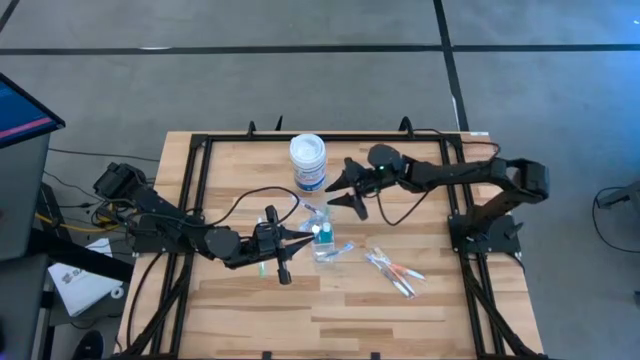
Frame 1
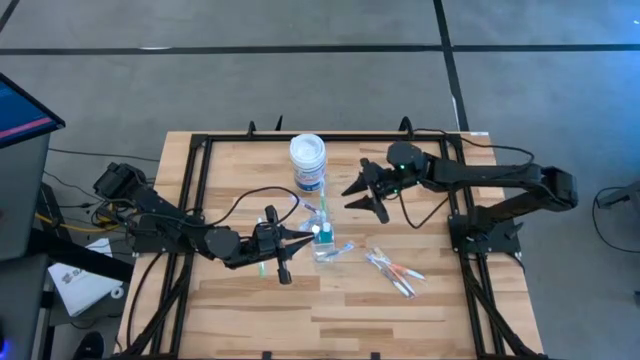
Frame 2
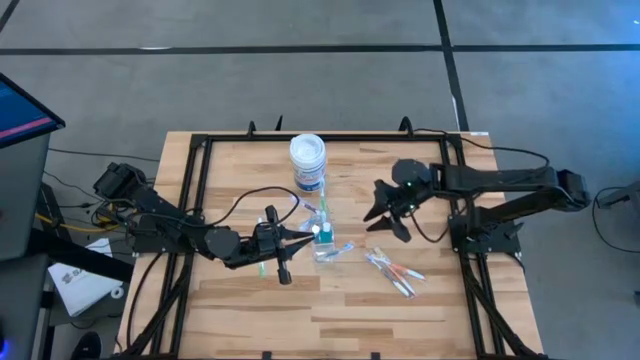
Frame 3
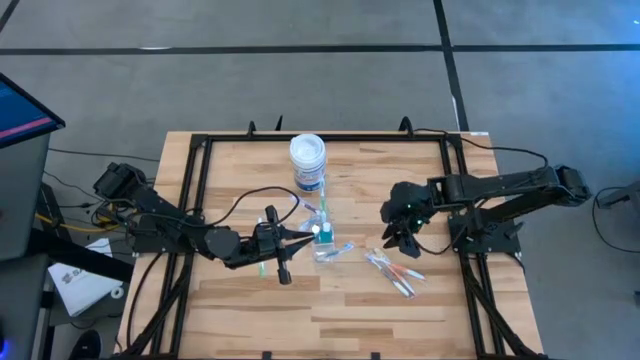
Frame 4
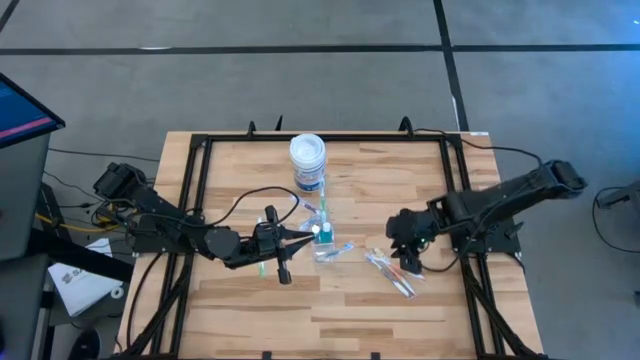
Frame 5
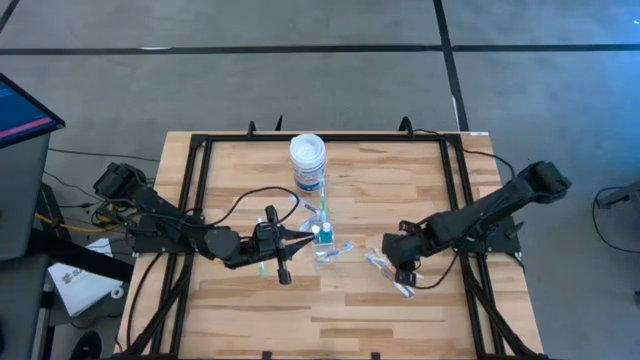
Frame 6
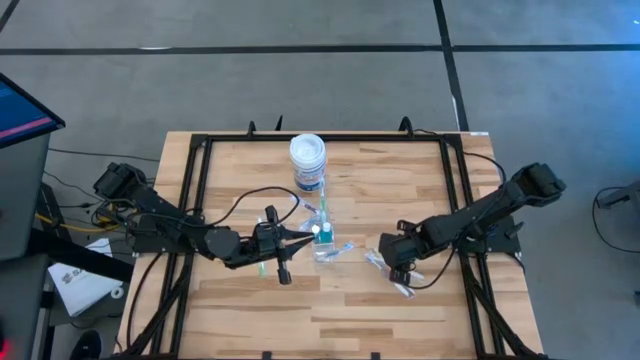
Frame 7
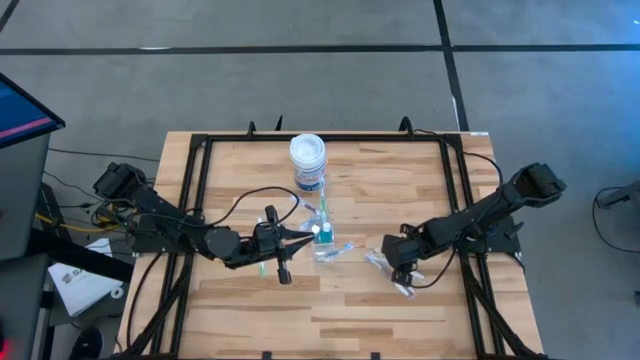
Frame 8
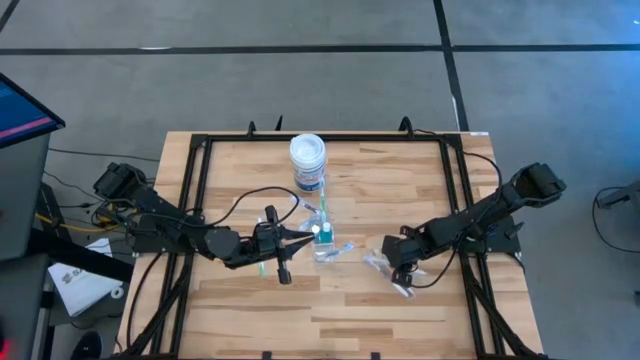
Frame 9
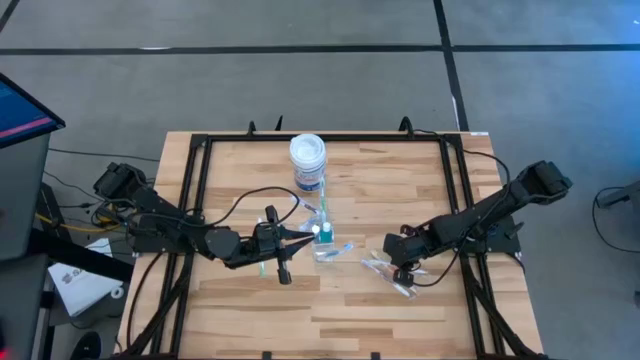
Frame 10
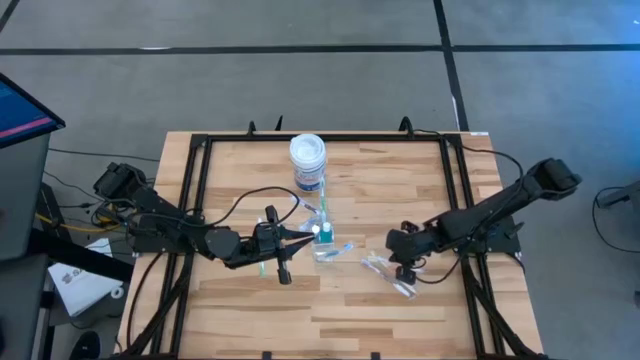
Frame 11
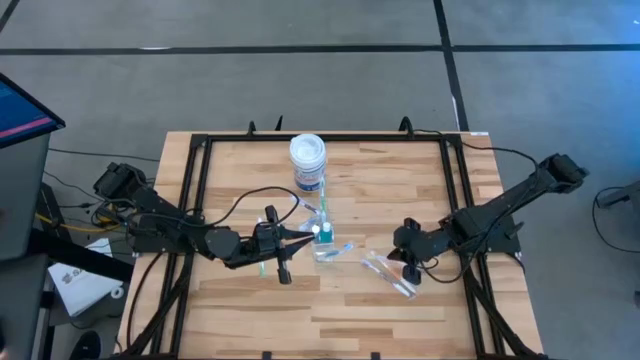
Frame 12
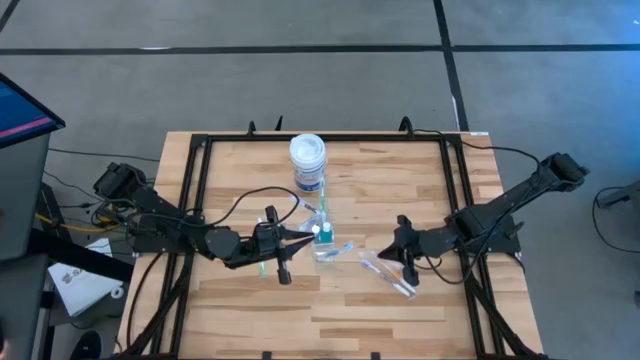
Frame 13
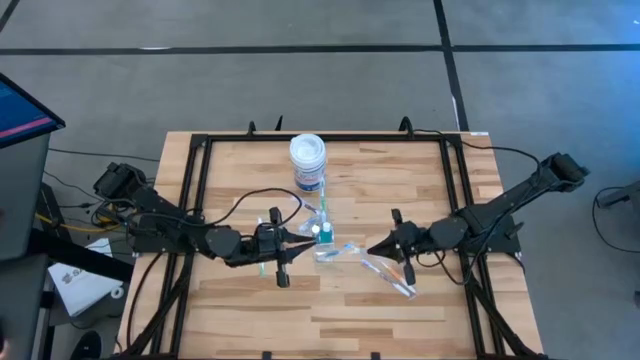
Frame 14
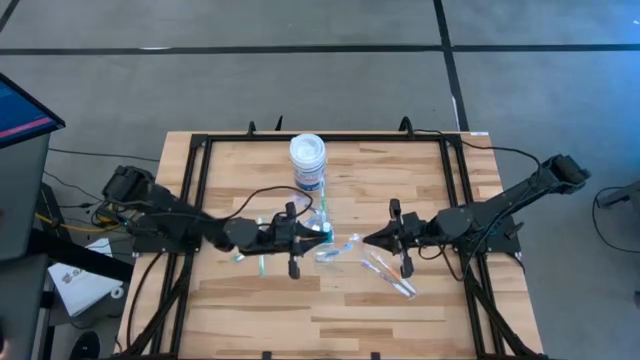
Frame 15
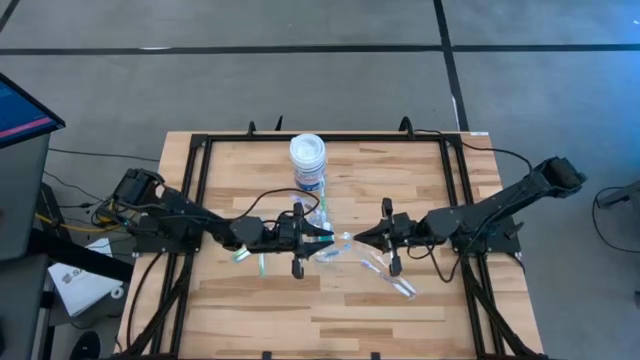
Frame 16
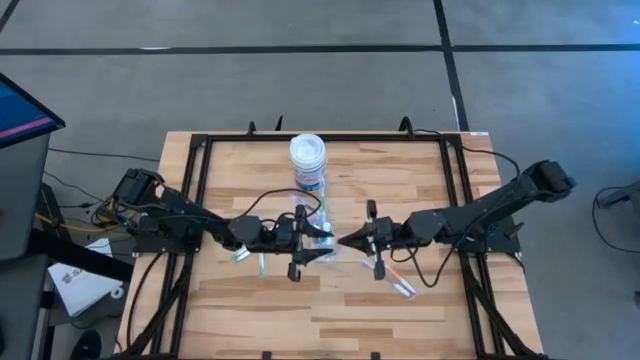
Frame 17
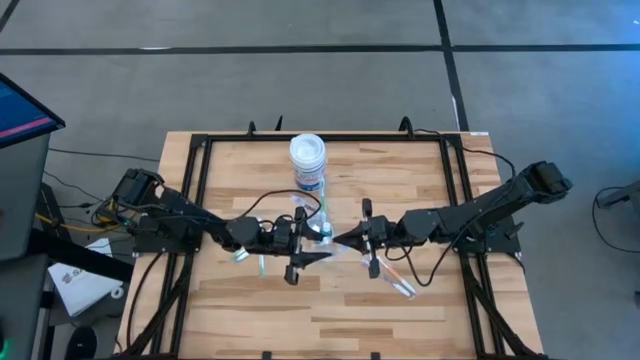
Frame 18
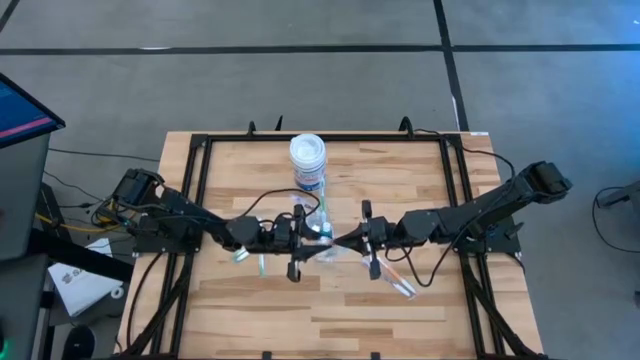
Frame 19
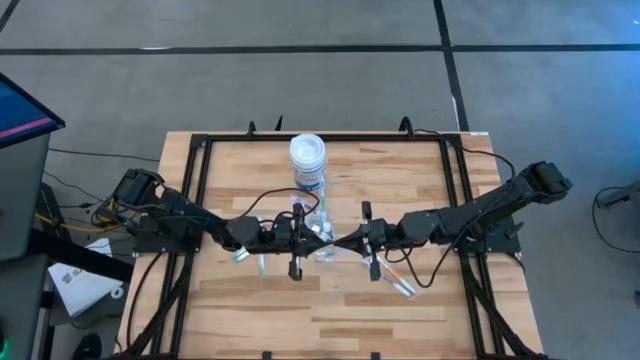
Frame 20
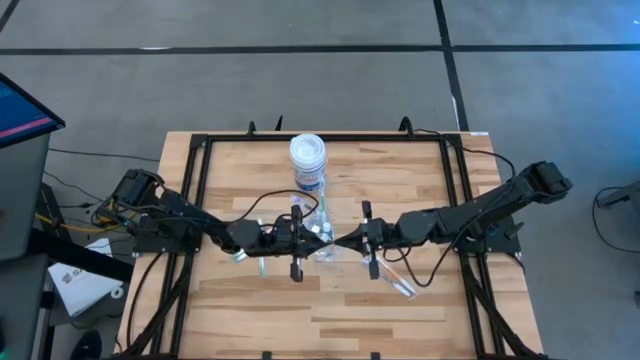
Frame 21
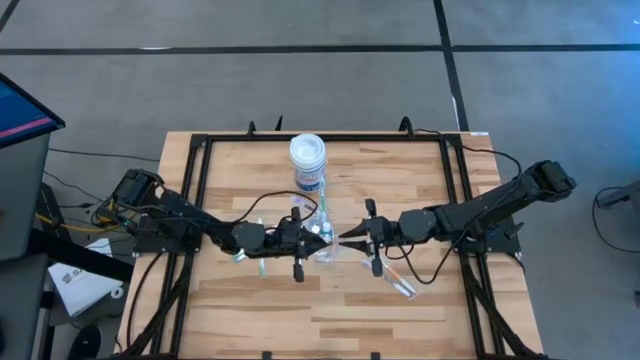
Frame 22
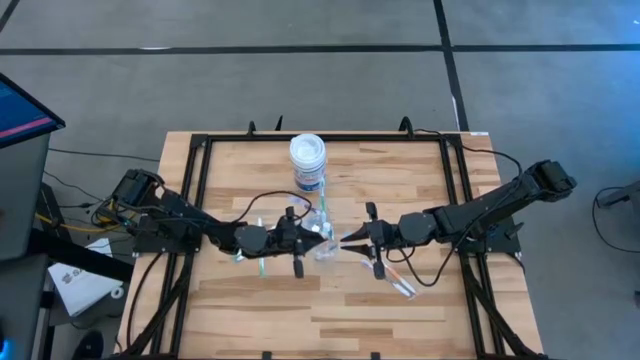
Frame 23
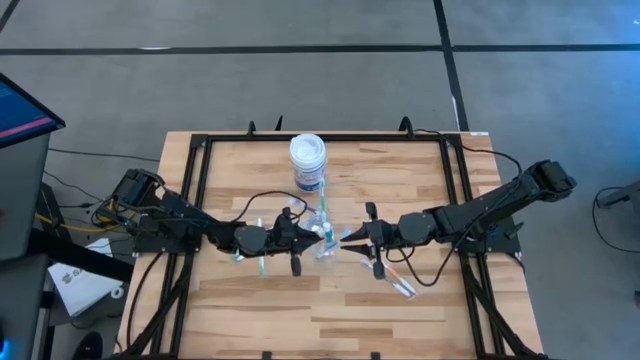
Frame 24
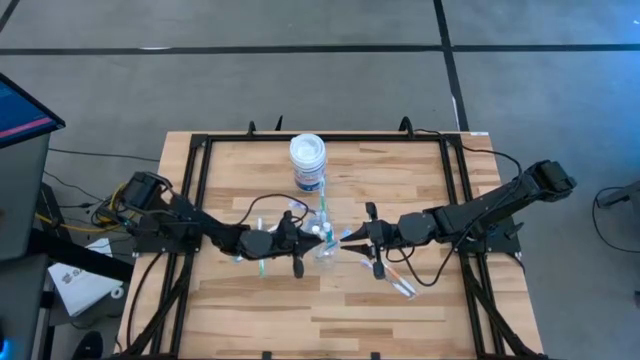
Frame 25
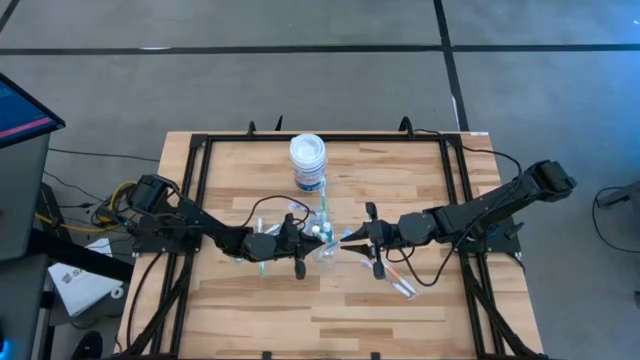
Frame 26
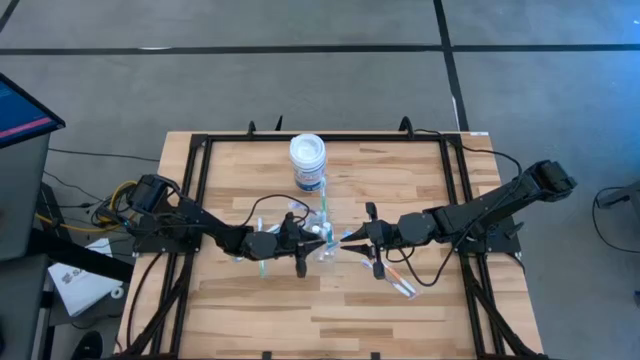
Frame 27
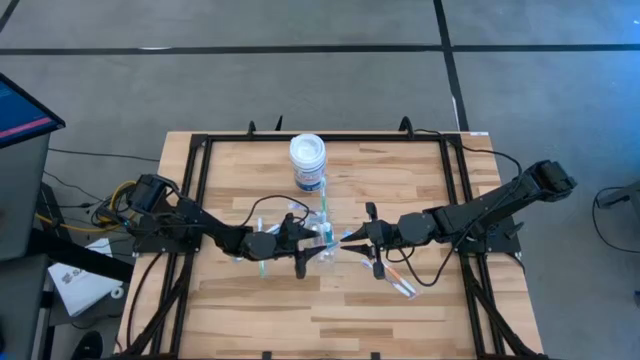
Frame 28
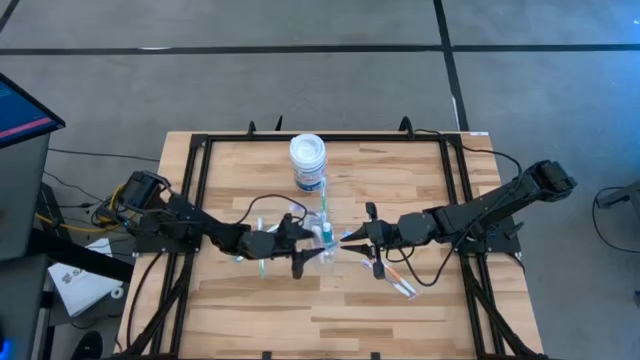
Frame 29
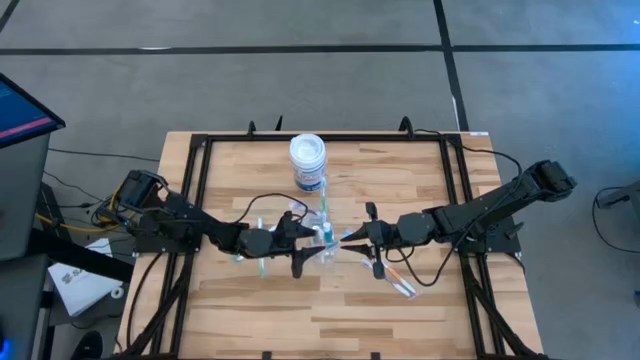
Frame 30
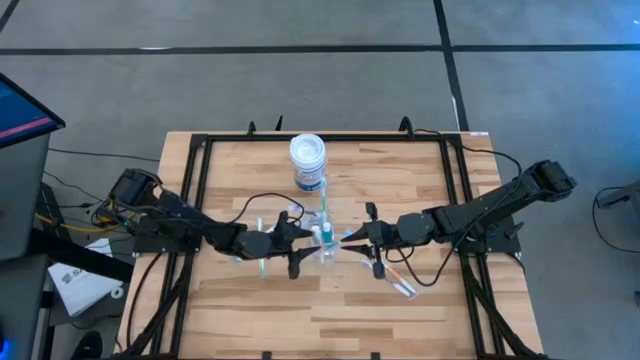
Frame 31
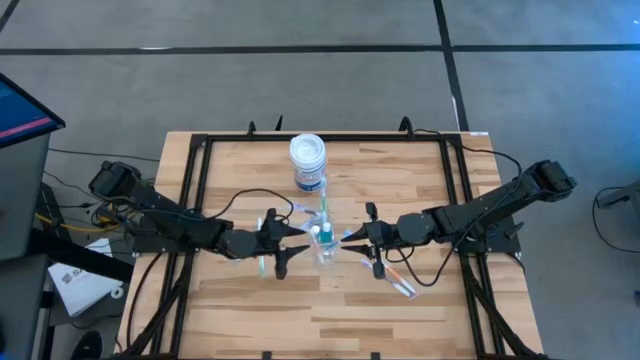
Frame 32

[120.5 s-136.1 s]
Task: Pick & Place toothbrushing station
Put the top orange toothbrush into the Transparent organizer

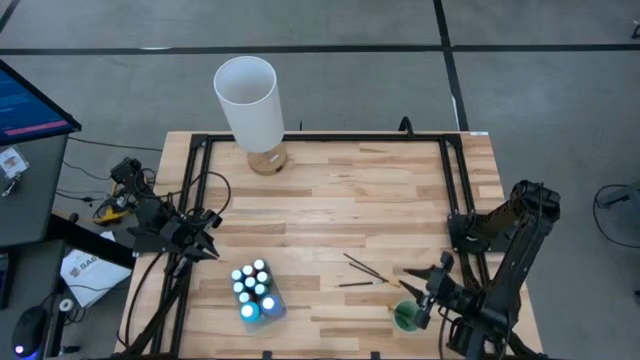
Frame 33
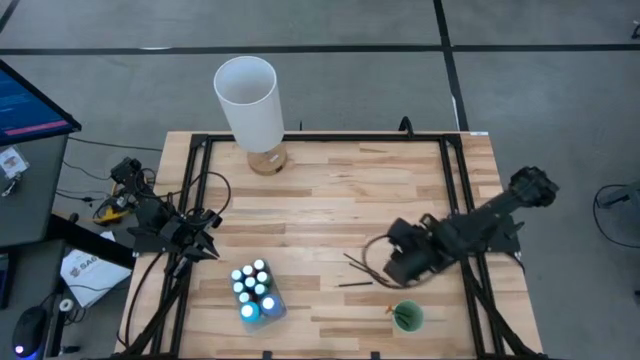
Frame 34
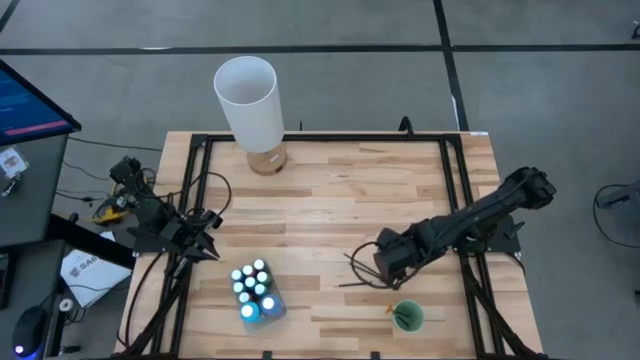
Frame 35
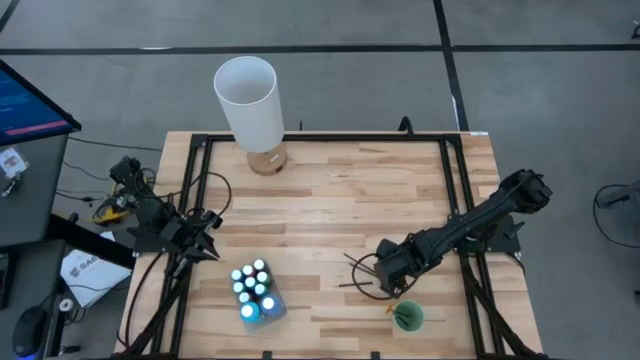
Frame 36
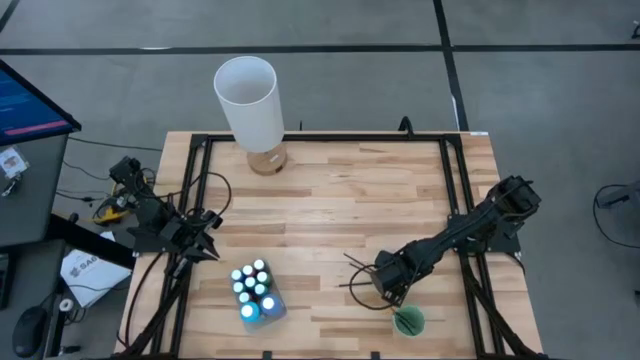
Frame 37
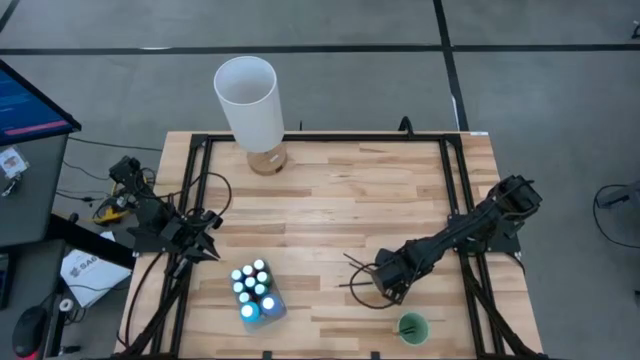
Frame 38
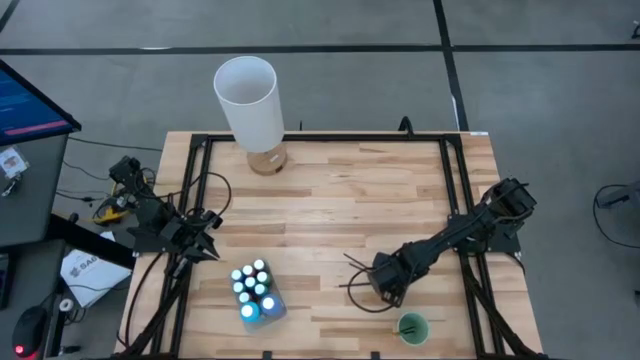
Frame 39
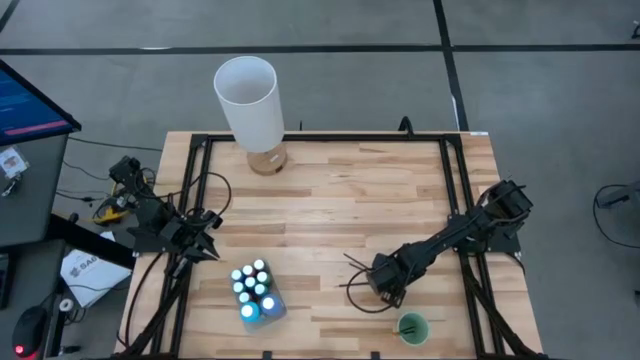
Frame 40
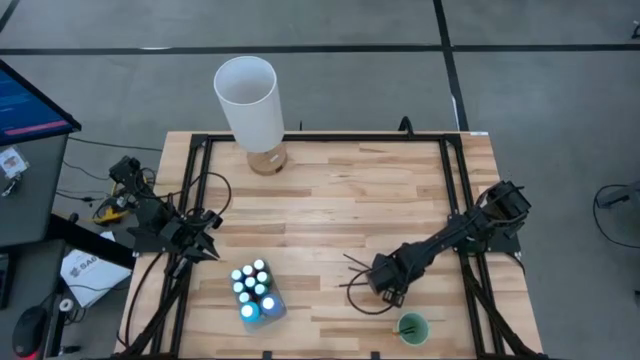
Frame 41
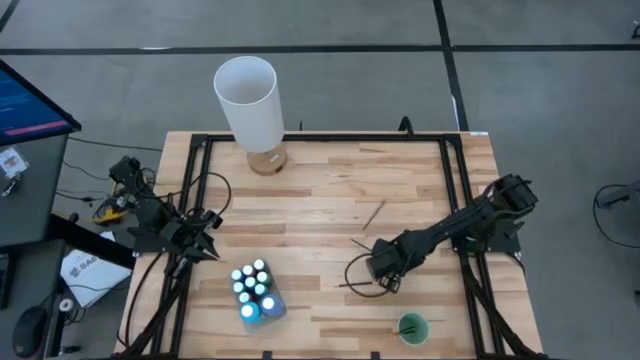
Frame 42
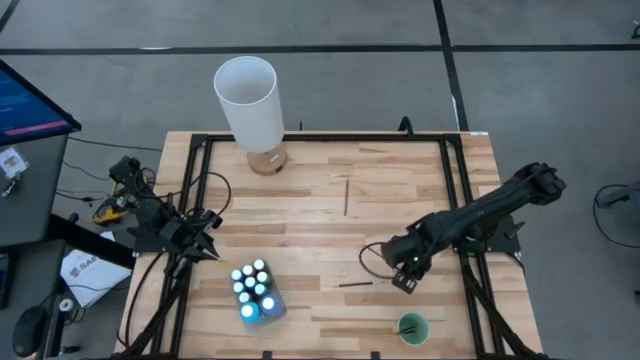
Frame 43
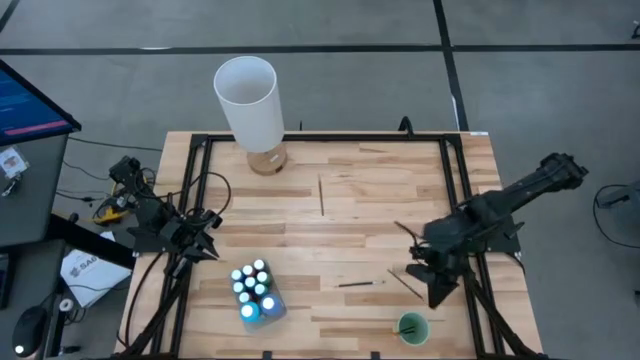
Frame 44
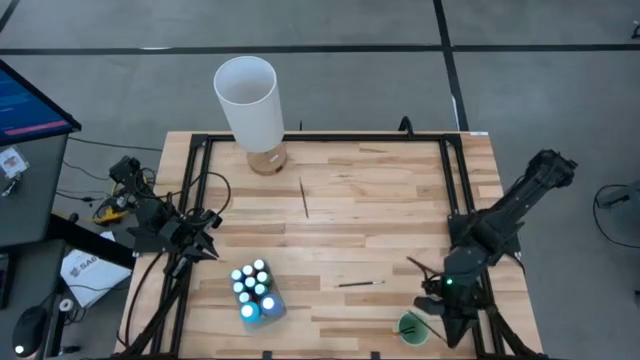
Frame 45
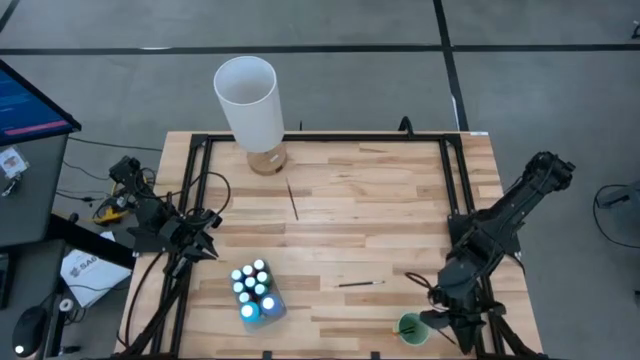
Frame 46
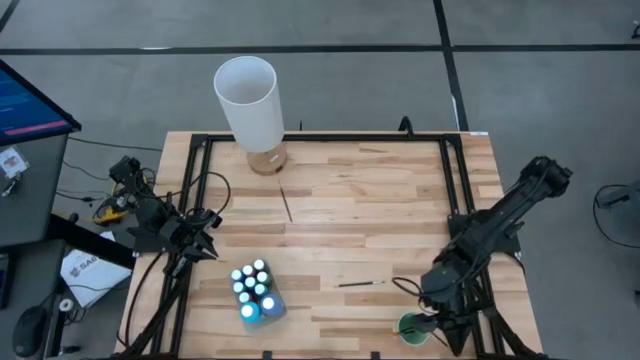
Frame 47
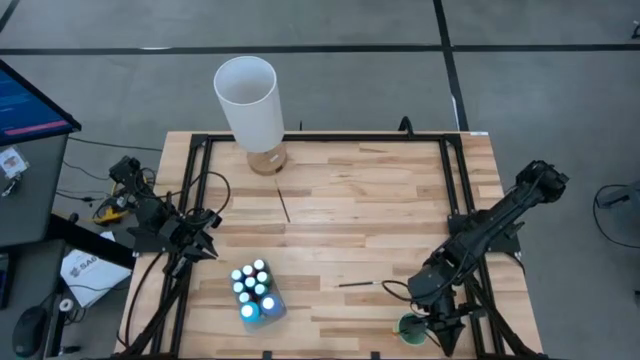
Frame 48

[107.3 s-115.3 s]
Task: Pick & Place Paint Supplies
Put the gold paint brush into the green cup
